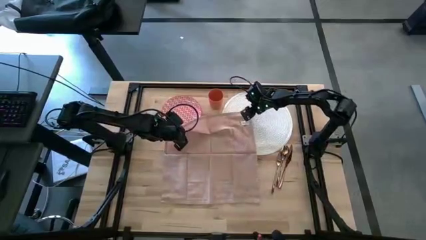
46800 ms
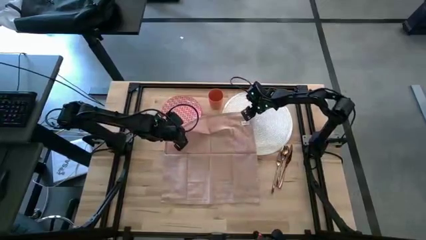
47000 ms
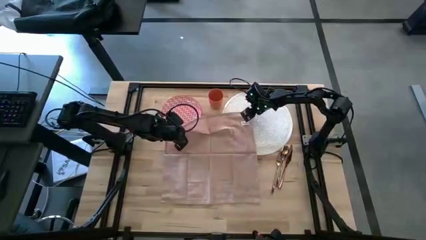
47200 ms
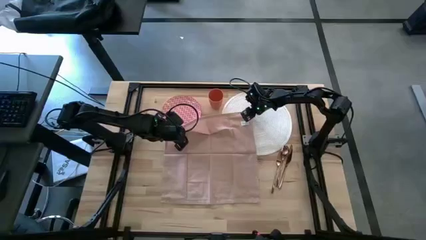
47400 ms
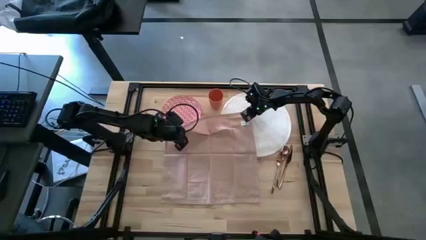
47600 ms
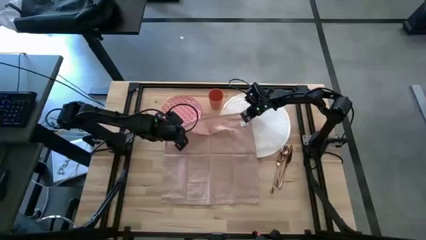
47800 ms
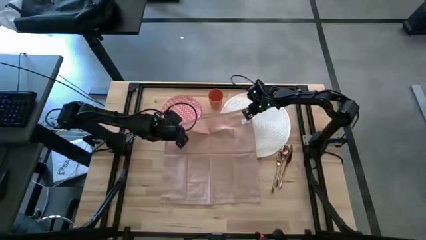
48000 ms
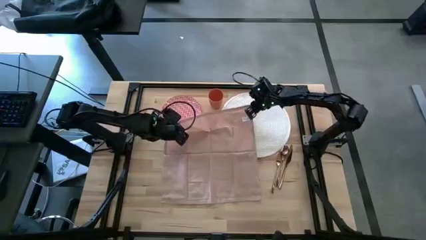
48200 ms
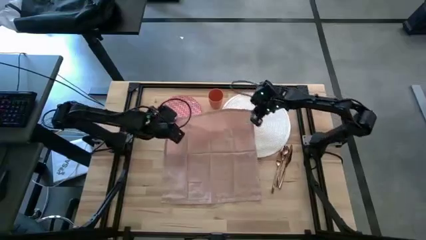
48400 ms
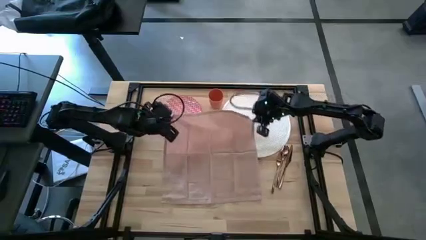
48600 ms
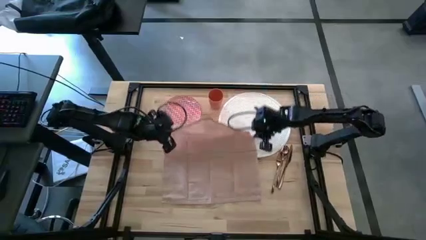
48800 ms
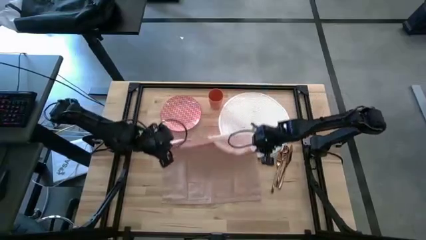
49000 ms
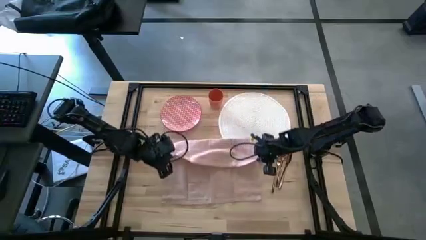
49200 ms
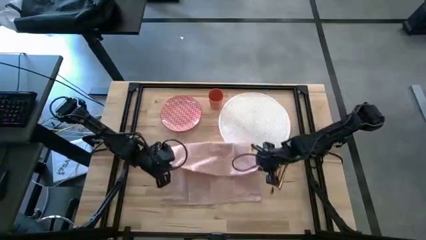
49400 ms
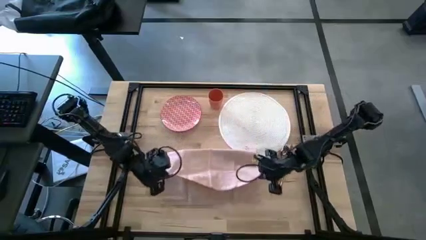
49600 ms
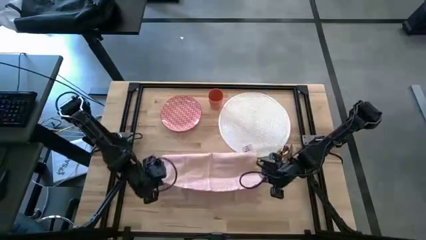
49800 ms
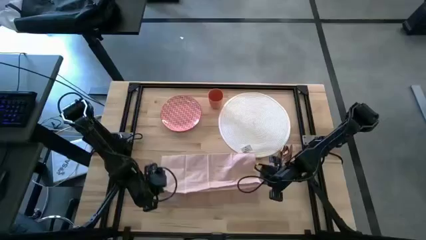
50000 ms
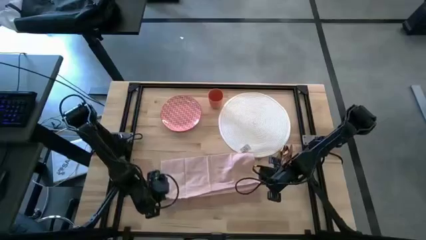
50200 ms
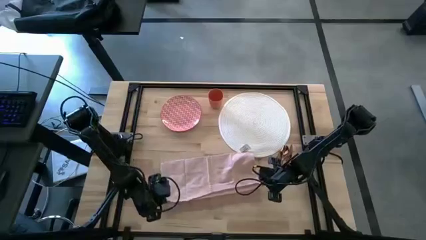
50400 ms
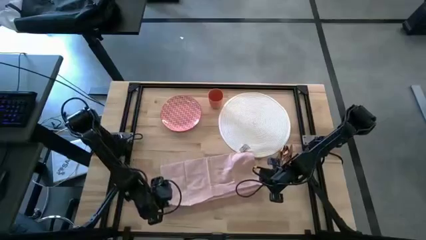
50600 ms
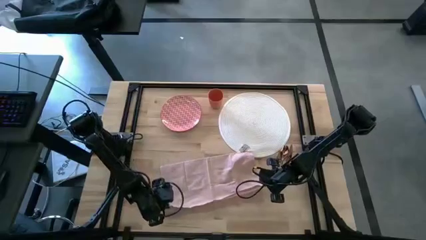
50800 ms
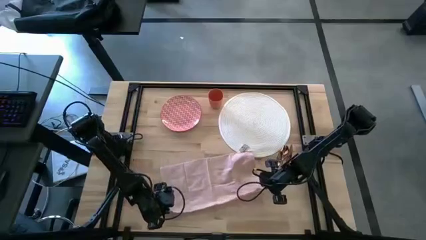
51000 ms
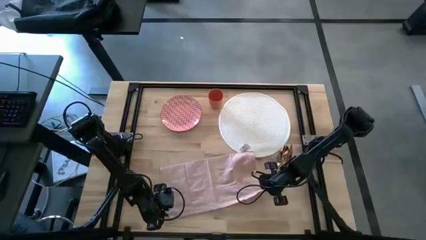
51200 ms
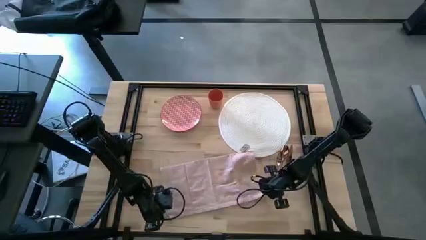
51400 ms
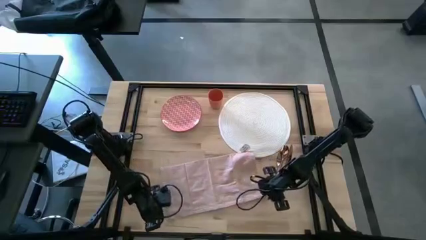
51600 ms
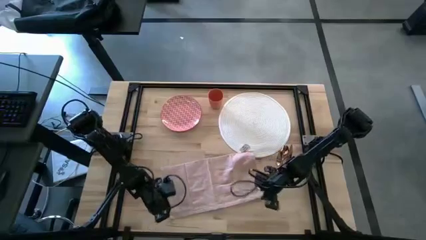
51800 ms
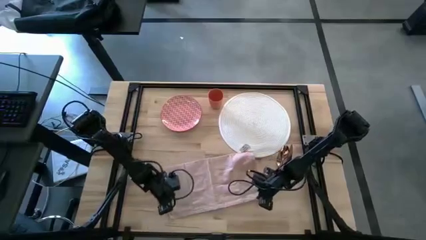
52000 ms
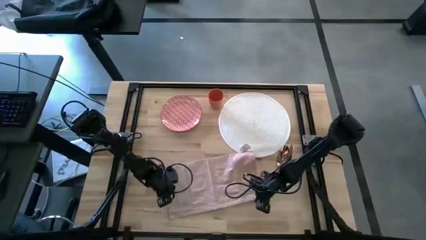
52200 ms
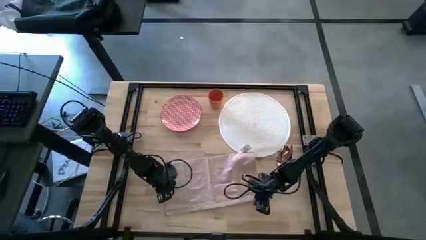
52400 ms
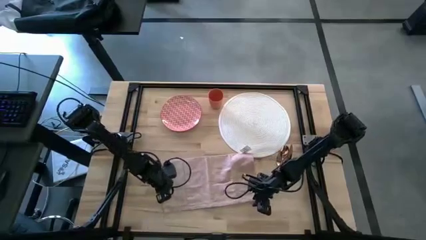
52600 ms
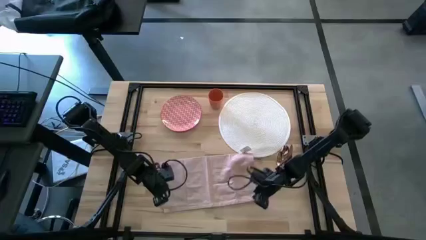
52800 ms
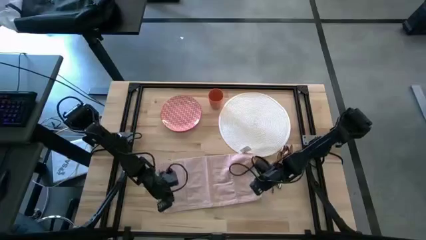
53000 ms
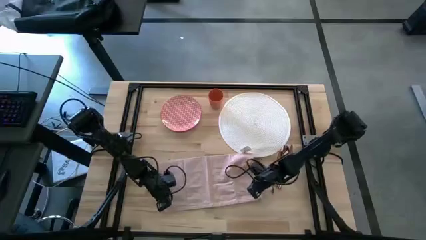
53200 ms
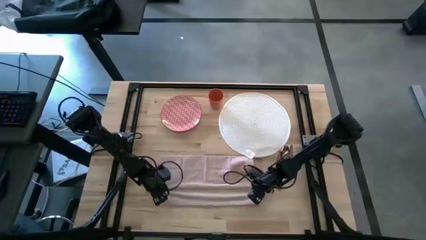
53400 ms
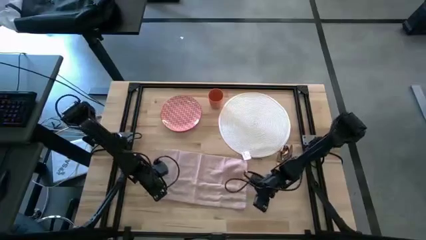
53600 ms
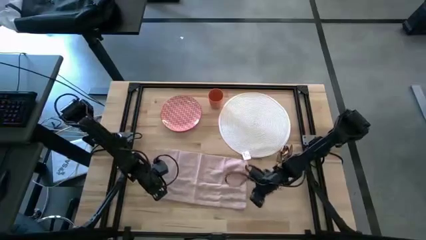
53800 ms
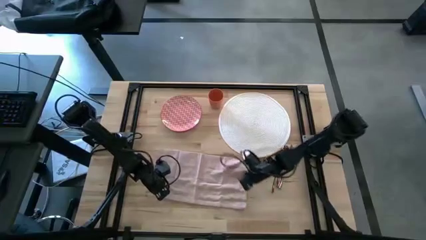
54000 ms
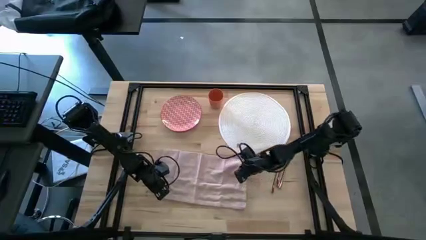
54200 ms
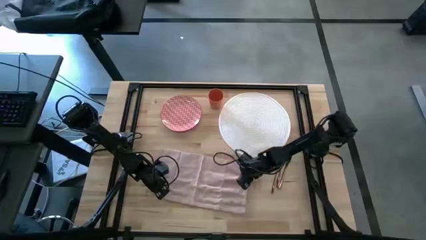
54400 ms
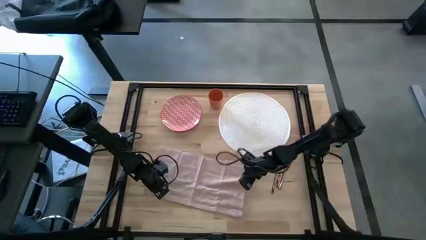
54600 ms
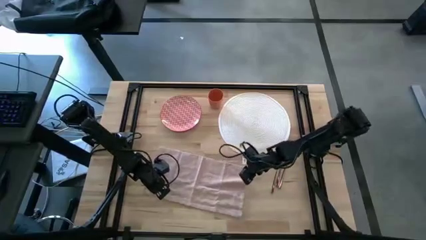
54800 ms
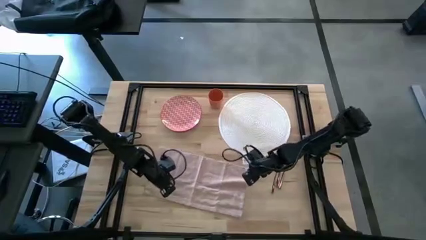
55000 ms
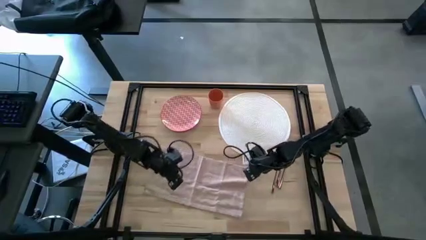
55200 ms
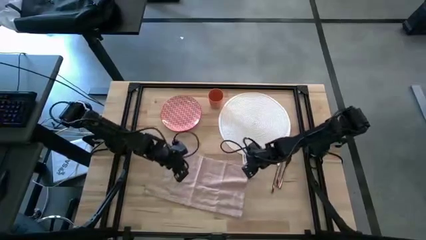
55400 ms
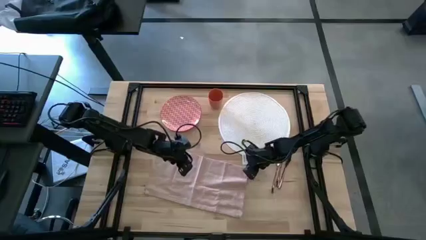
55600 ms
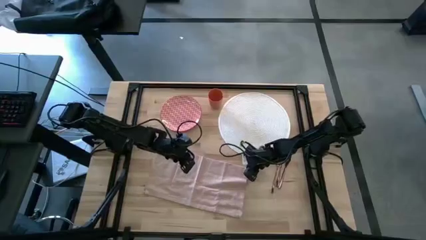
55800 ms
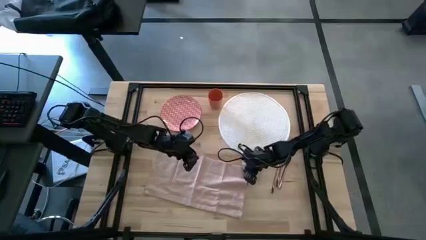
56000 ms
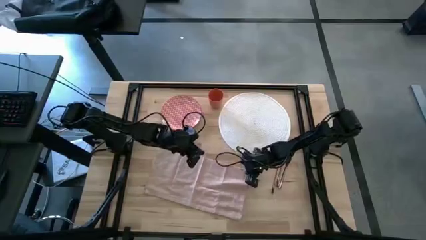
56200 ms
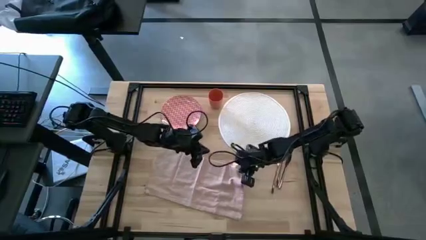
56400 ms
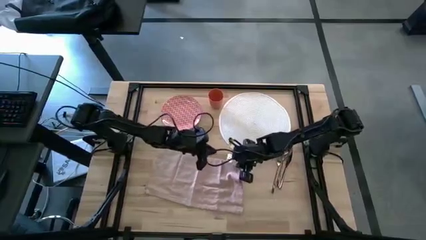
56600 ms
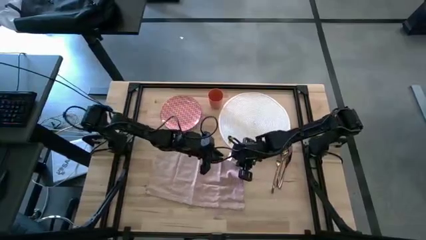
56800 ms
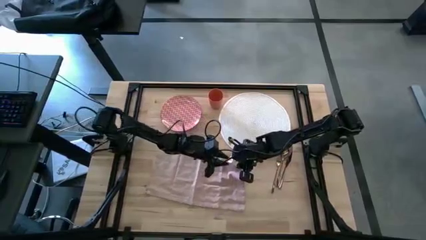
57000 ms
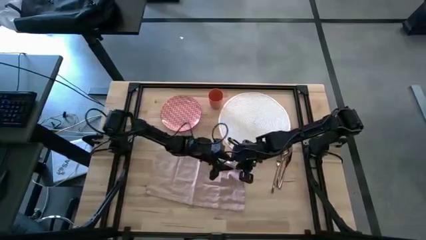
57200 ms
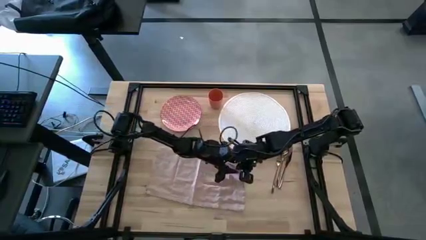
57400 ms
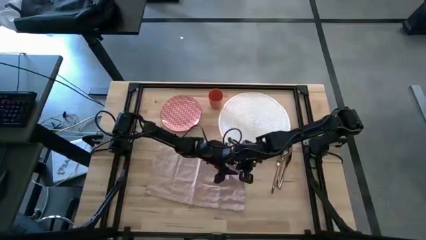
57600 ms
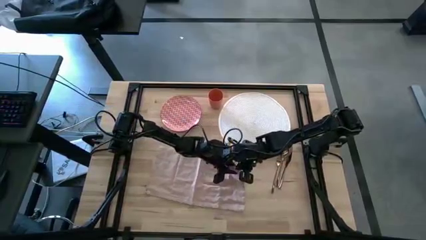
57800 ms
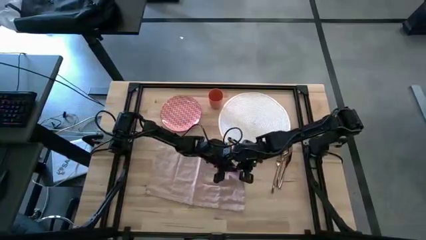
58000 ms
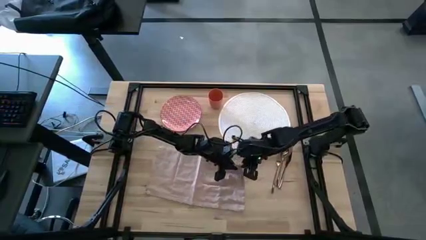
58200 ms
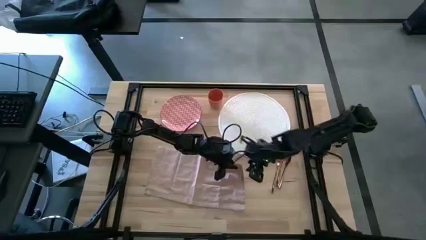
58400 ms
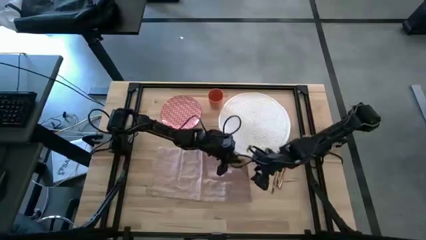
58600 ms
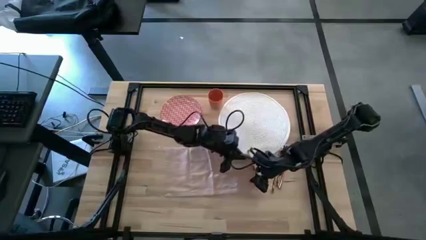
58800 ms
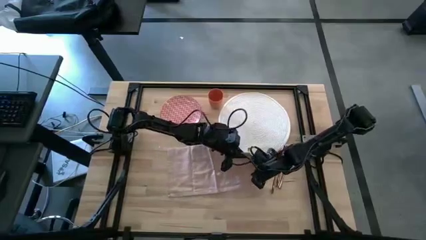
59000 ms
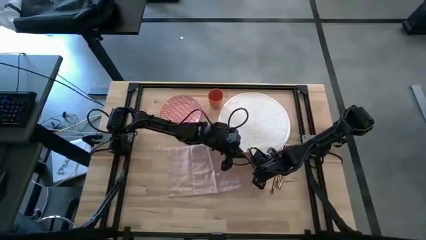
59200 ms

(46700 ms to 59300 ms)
Task: Set table place
Fold the pink napkin
